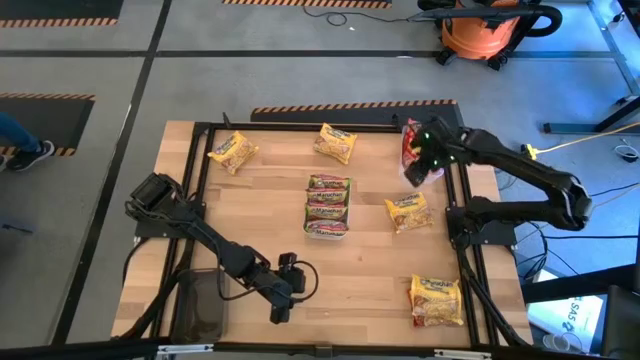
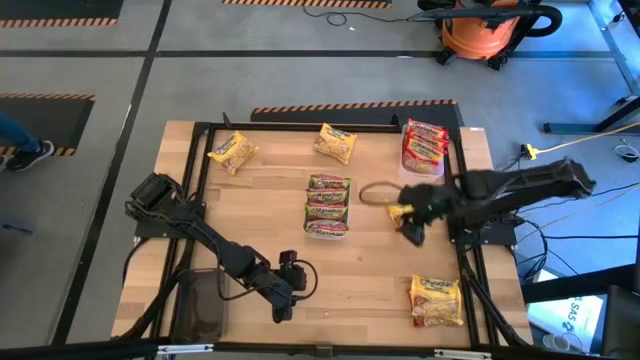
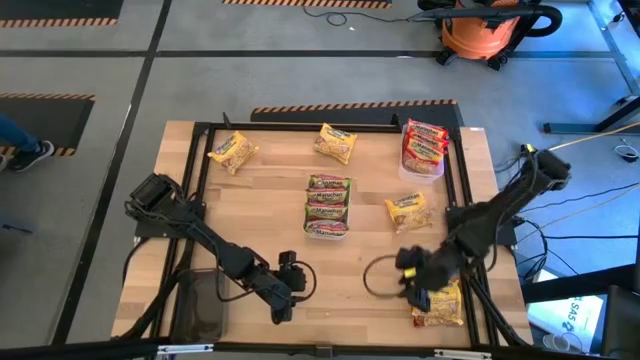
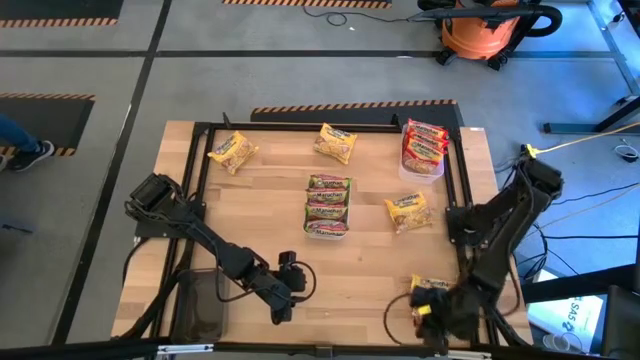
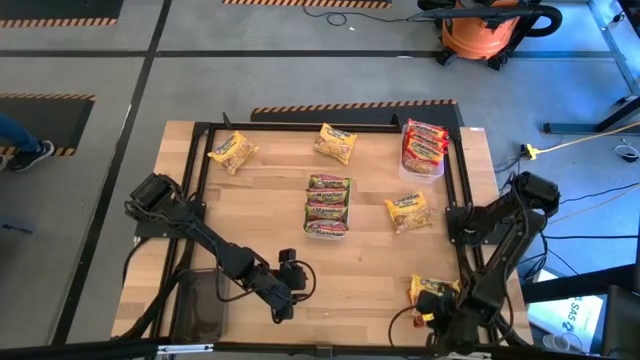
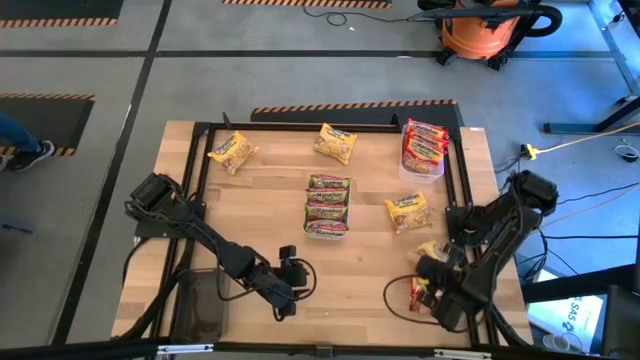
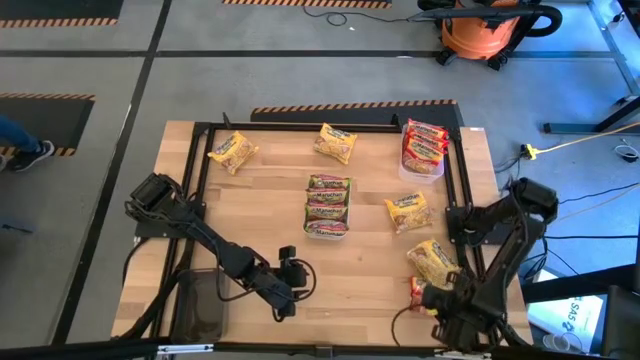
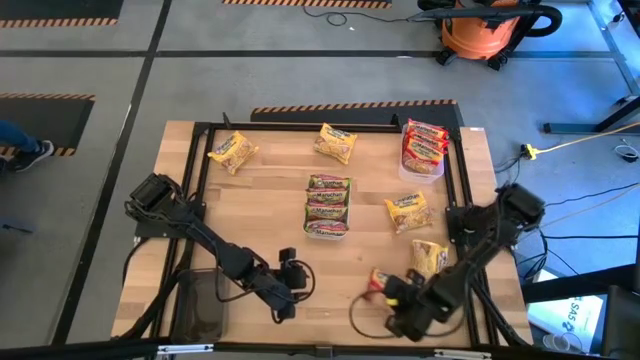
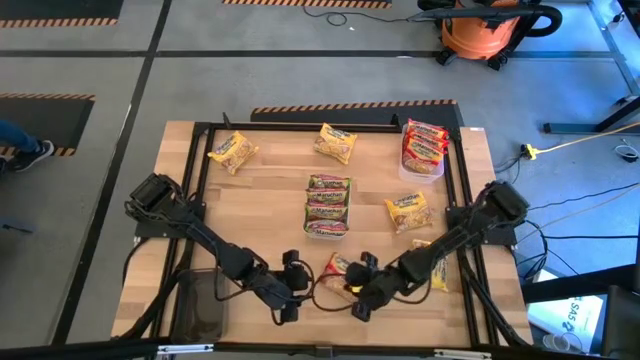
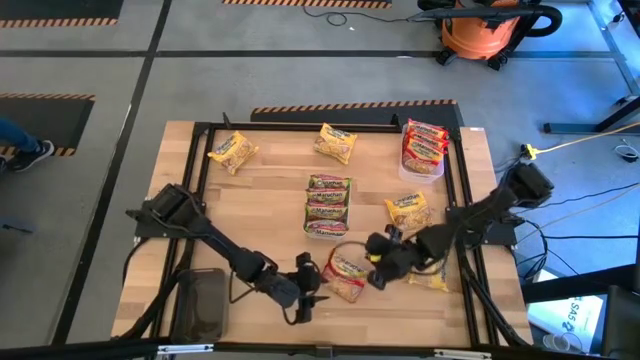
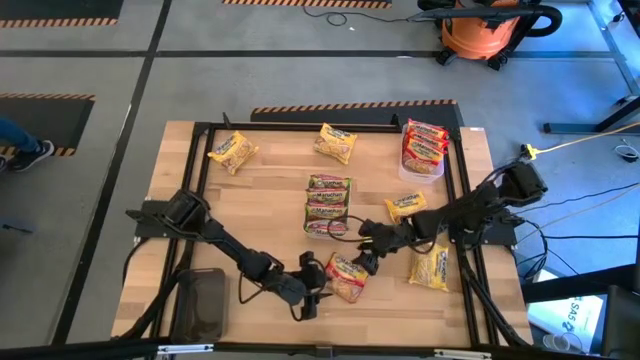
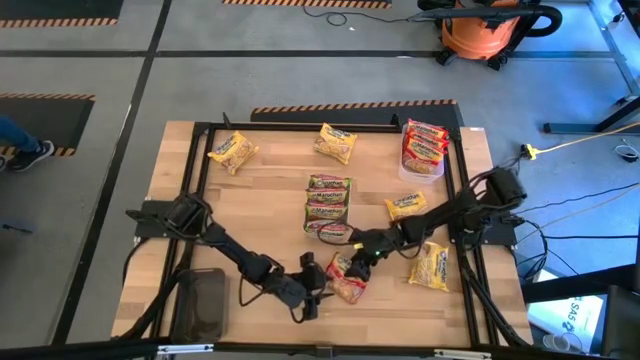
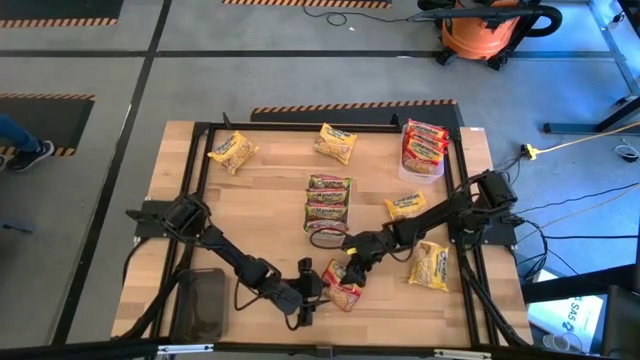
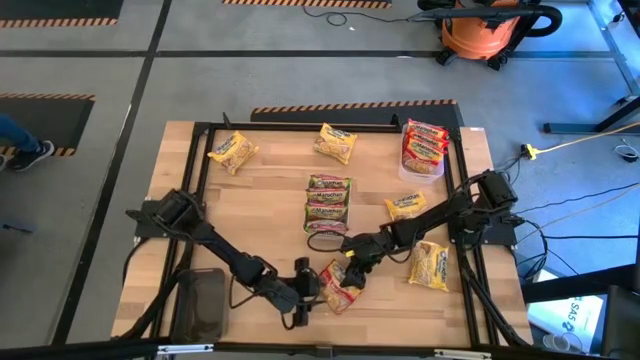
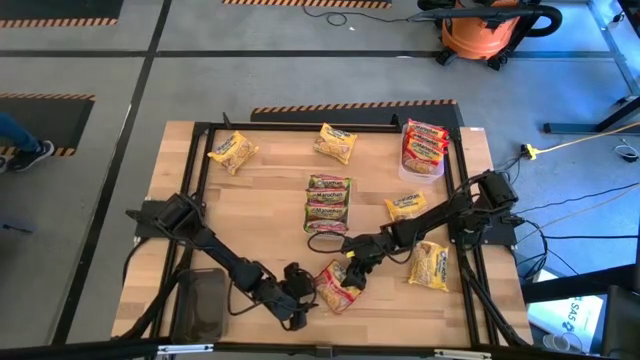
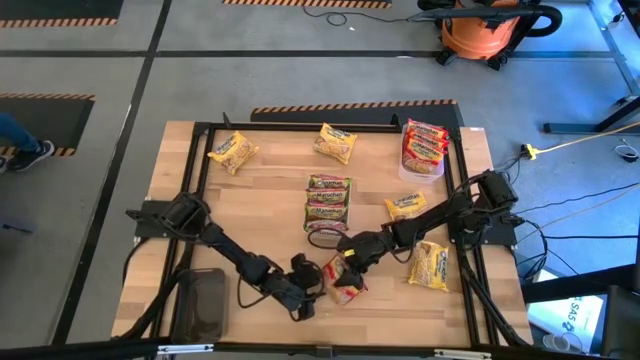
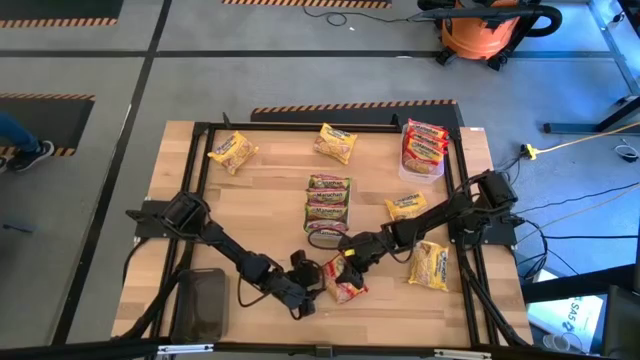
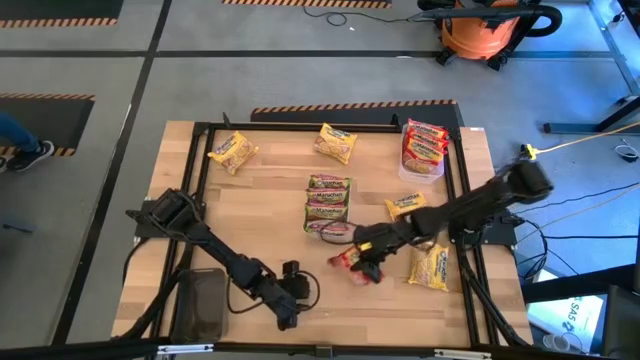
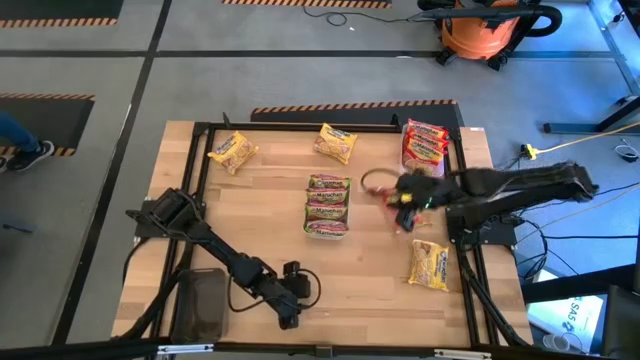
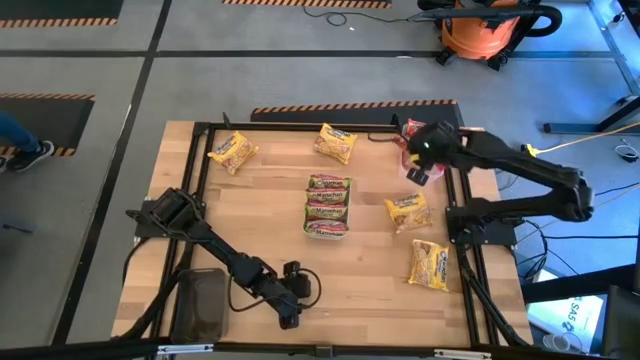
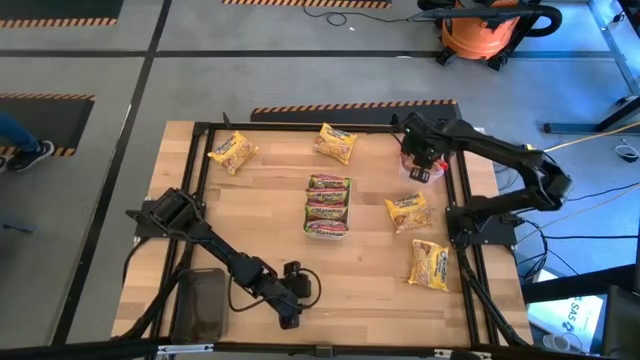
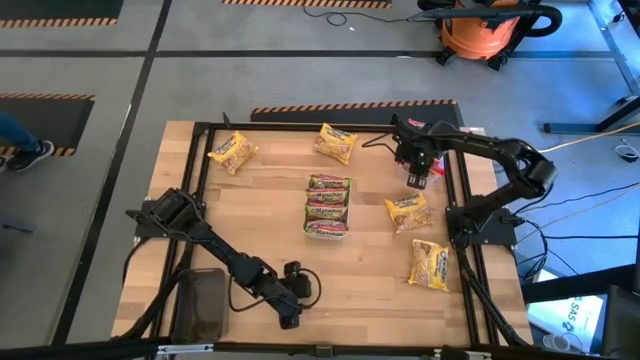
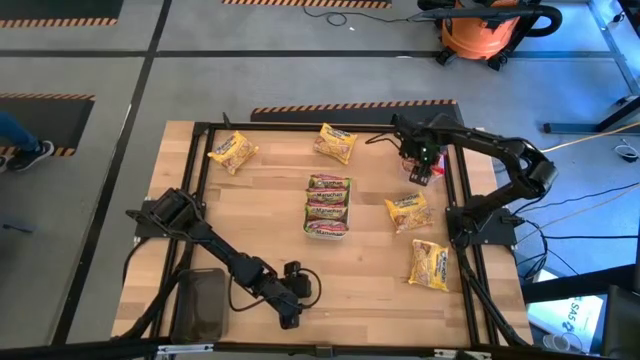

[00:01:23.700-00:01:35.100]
Task: Sort Maruchan noodles
Put the red noodle pack into the transparent bin

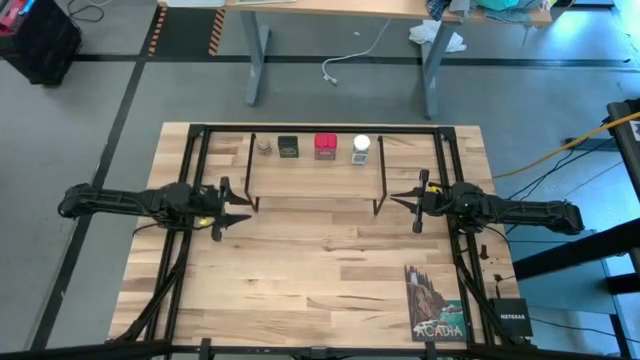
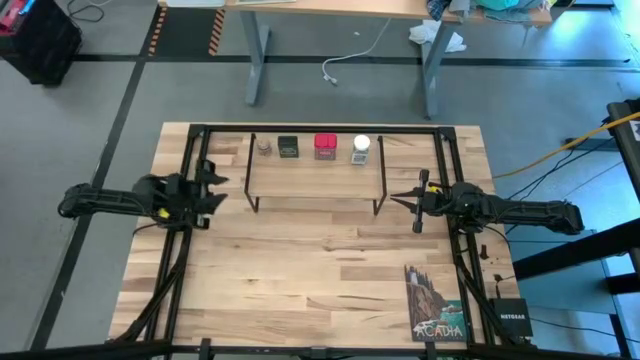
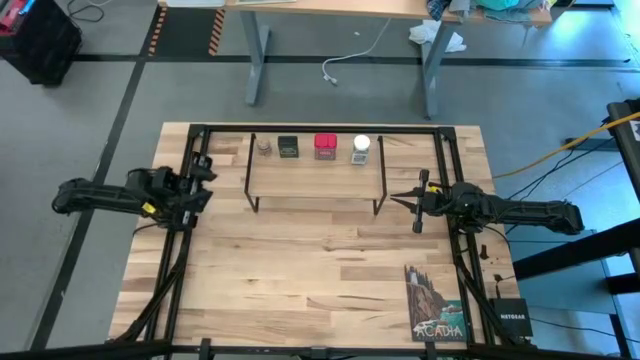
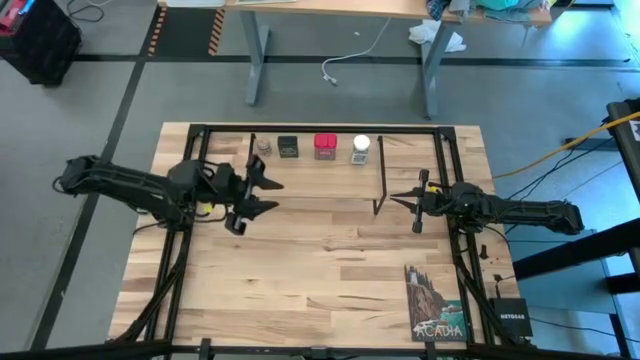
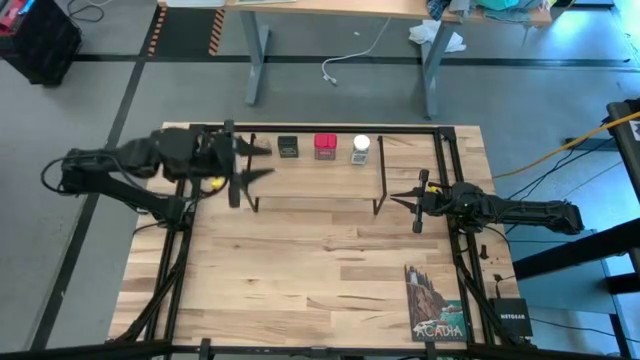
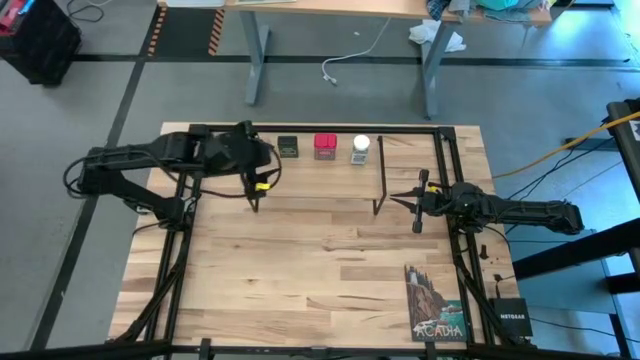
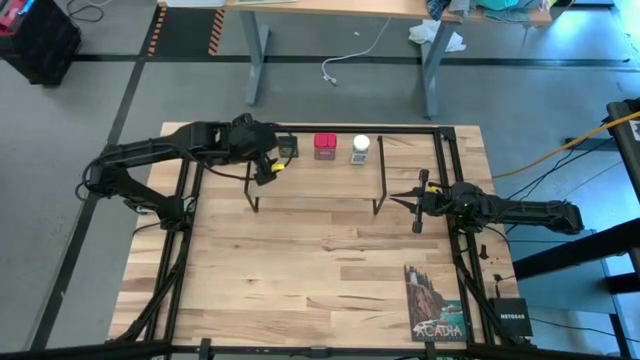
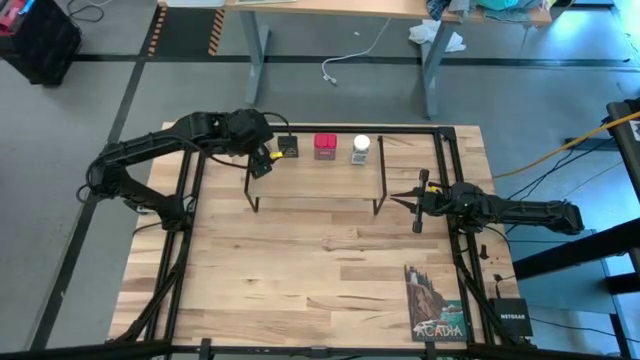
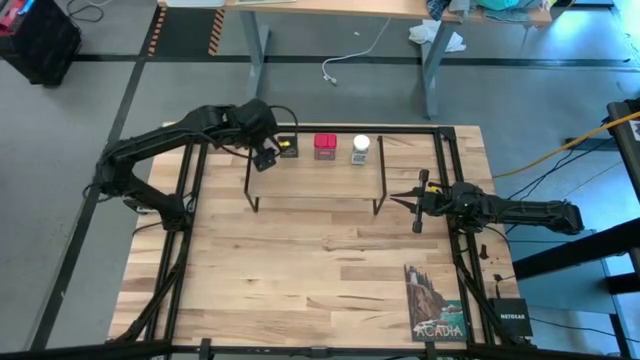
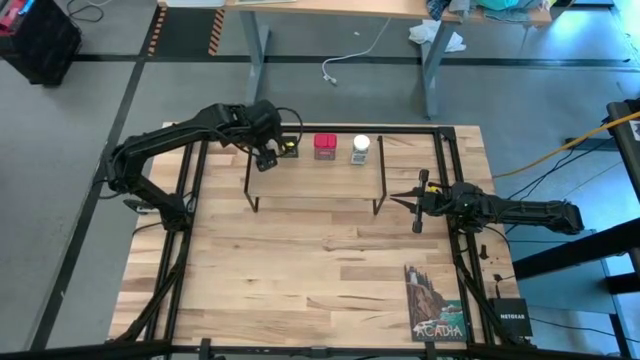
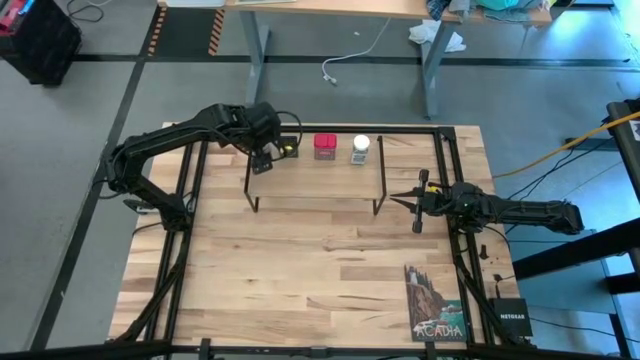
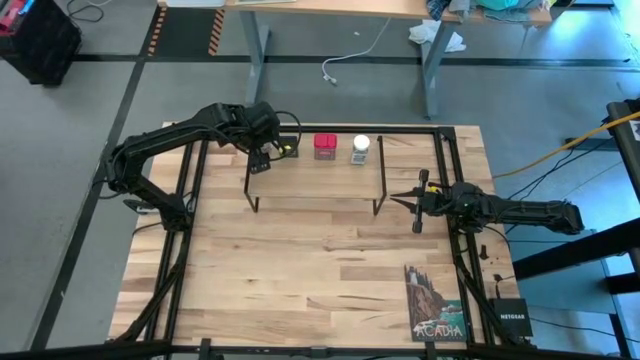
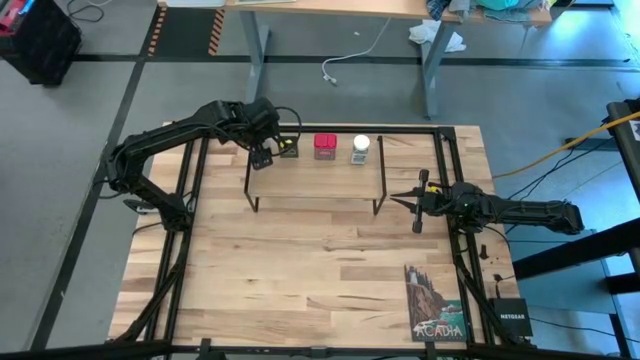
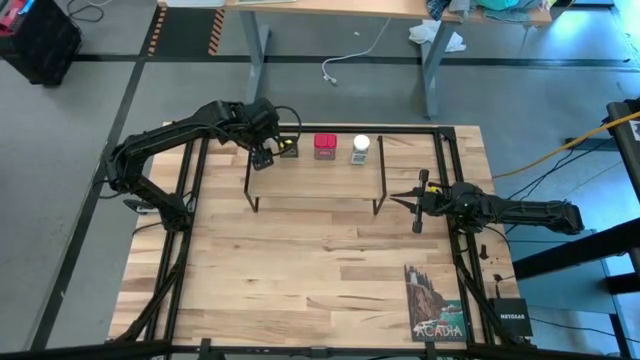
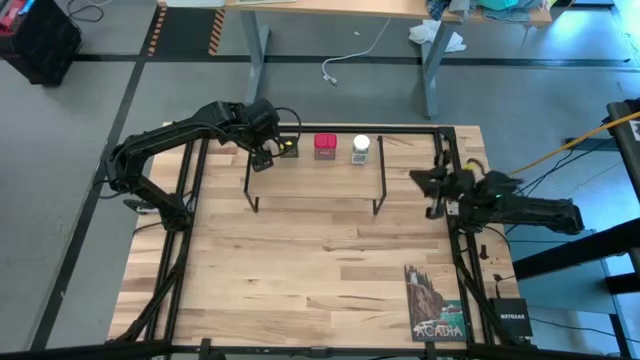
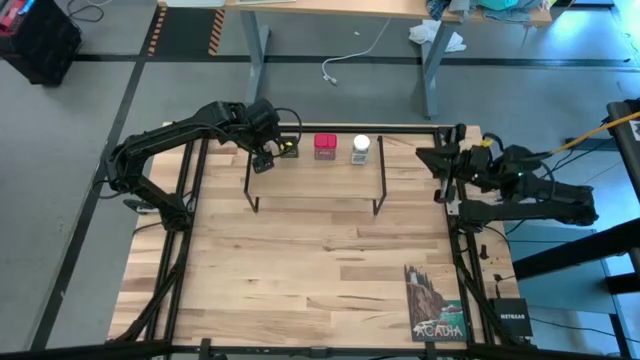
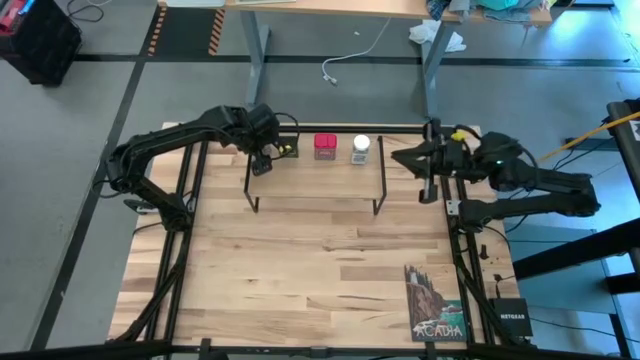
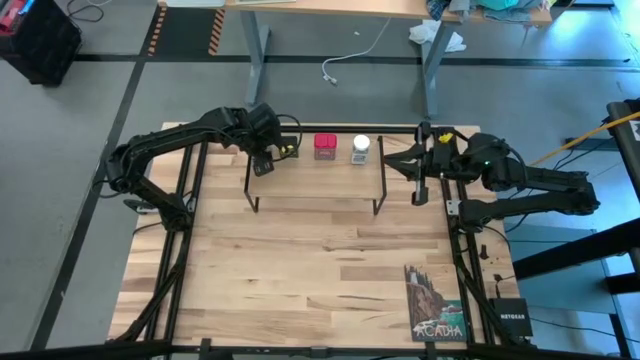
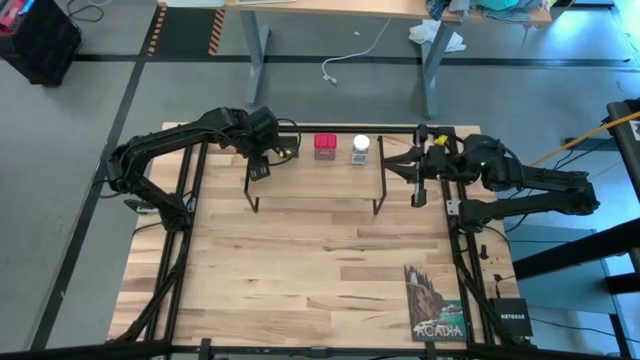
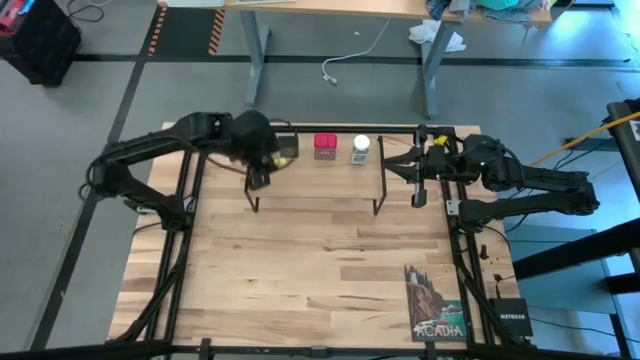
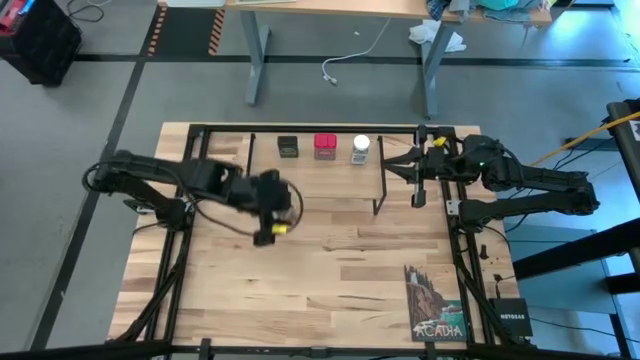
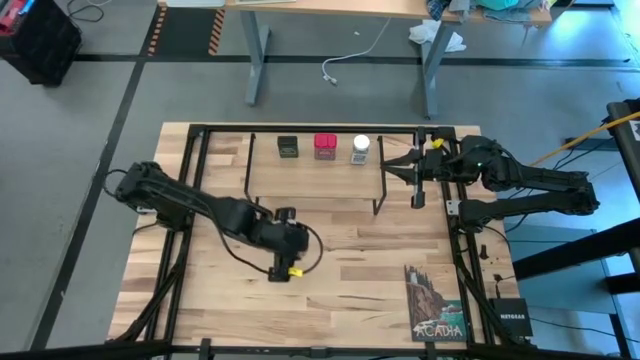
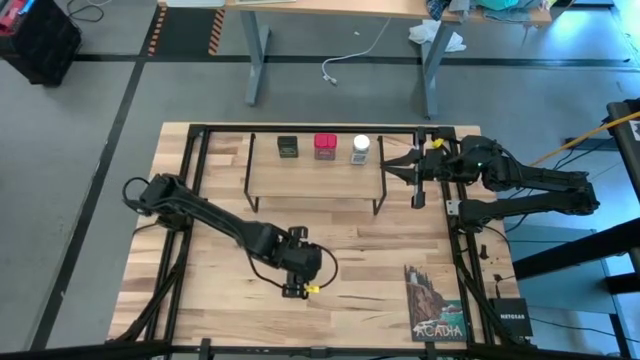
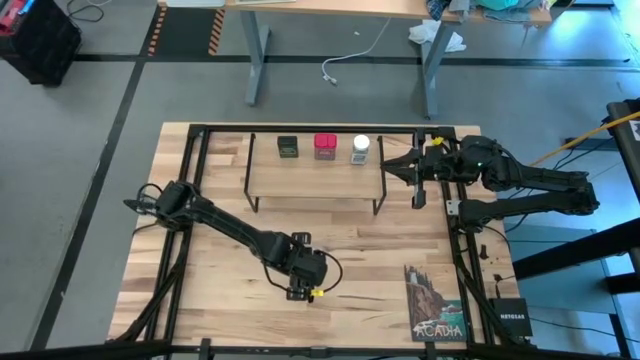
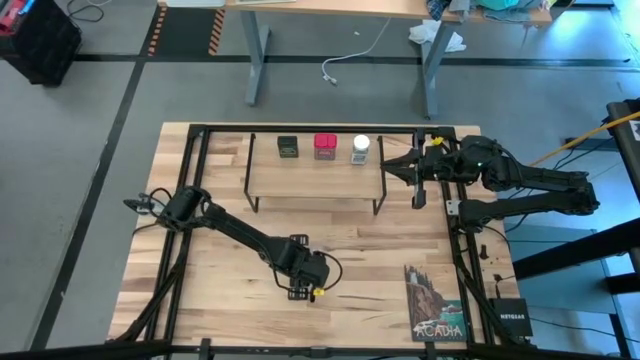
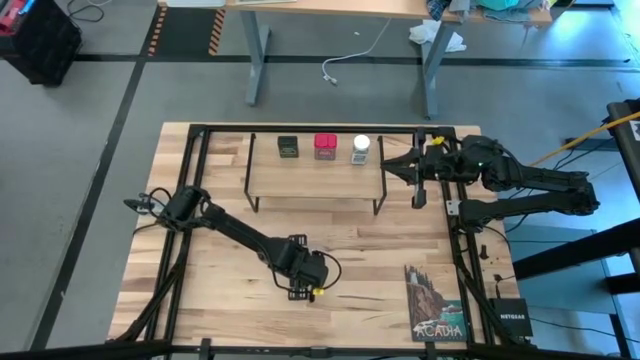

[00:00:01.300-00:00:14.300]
Task: Shelf spices
Remove the transparent seasoning bottle from the shelf
